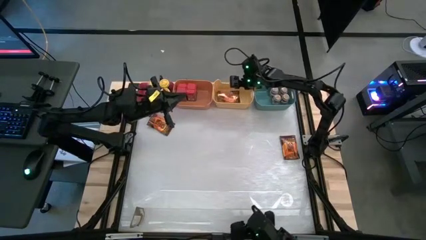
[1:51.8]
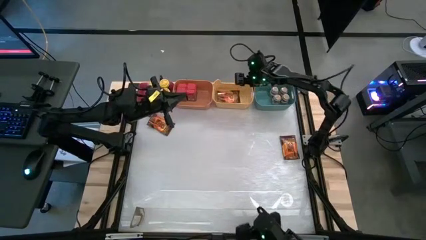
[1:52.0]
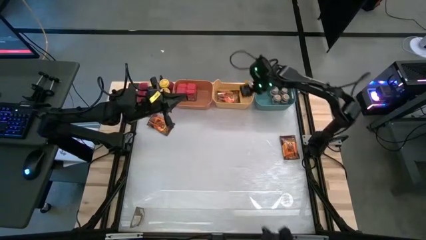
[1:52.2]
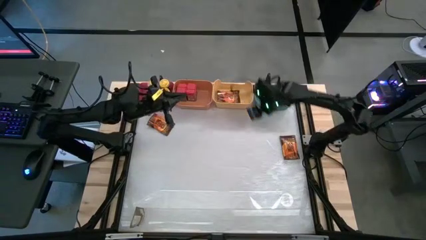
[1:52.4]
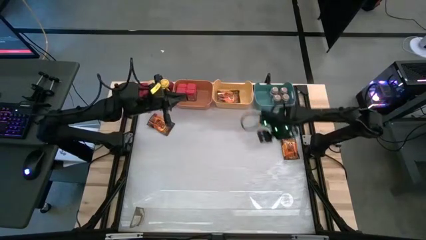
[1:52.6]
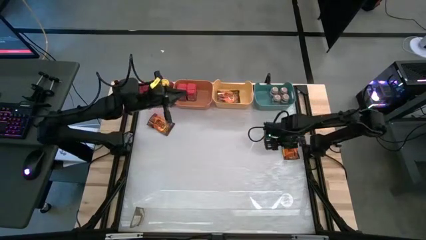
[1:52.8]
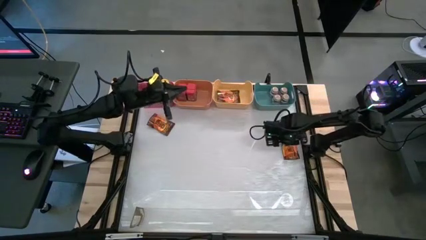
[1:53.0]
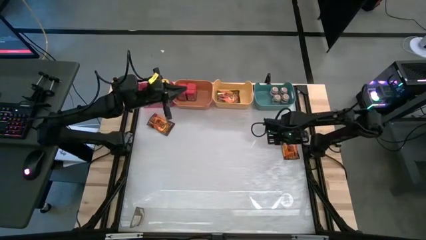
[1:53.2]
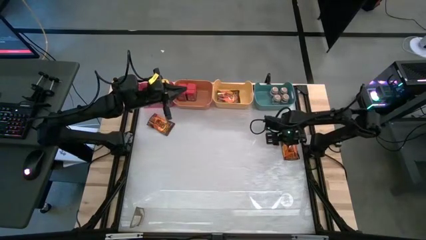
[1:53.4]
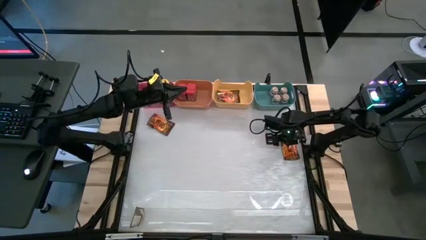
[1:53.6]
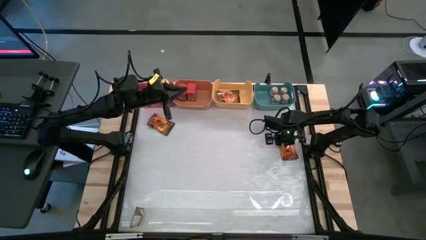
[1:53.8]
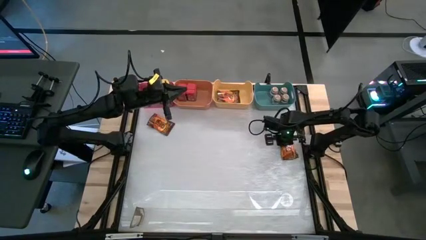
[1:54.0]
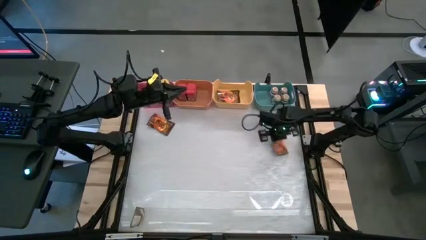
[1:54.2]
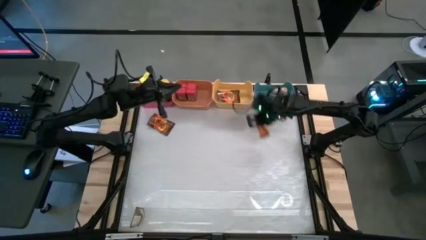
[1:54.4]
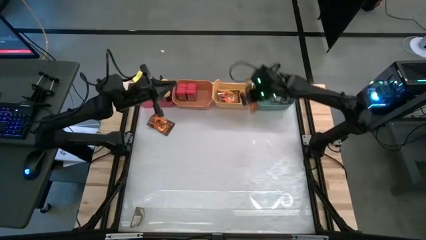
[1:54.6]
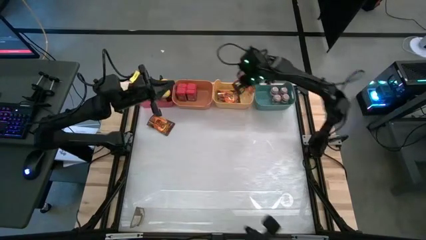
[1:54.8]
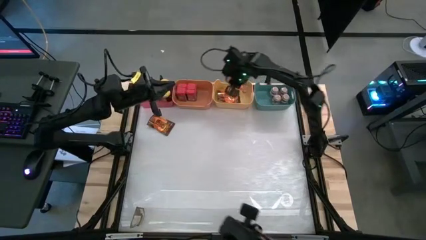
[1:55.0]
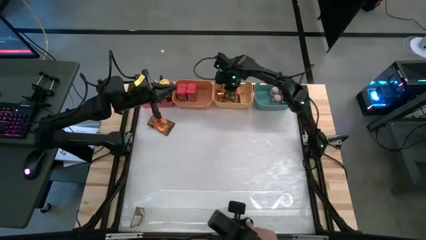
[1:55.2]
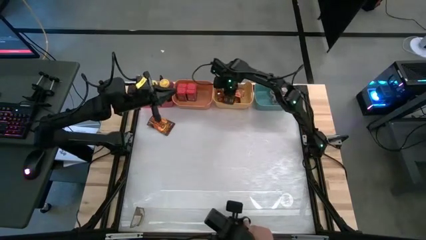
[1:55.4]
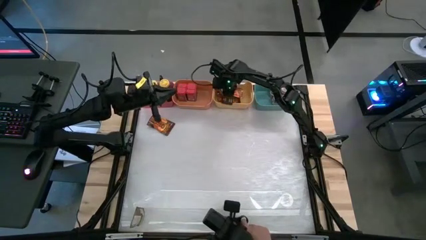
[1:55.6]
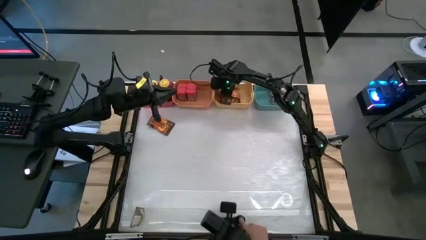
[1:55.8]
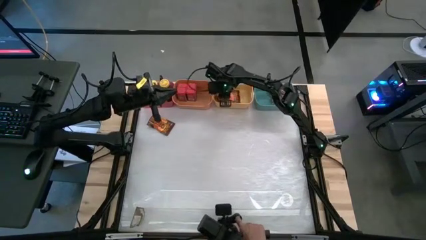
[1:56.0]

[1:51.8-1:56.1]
Task: Sort spices by type
Put the top orange seasoning pack into the yellow bin

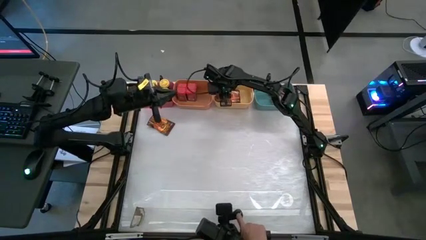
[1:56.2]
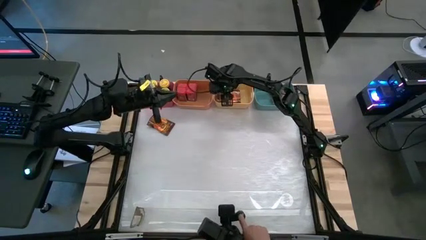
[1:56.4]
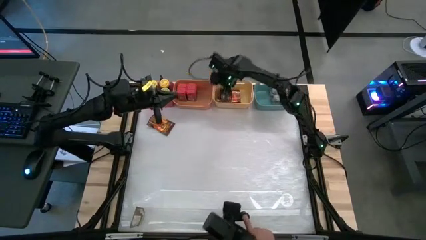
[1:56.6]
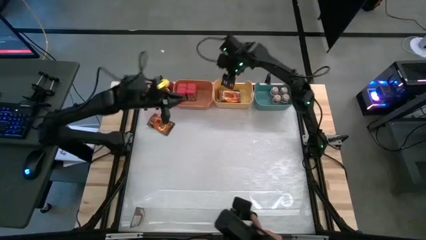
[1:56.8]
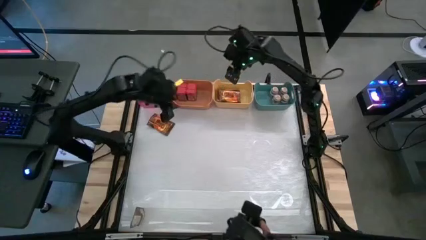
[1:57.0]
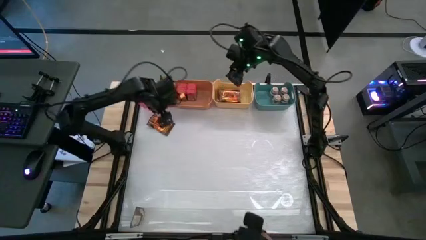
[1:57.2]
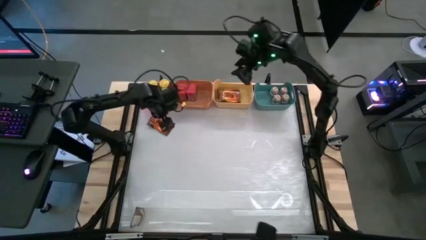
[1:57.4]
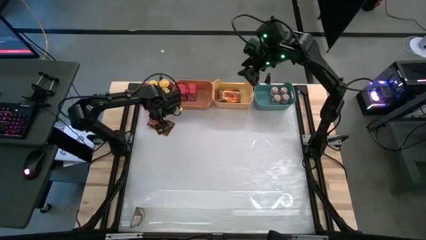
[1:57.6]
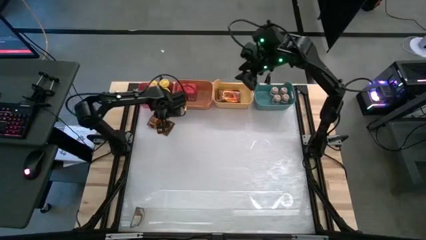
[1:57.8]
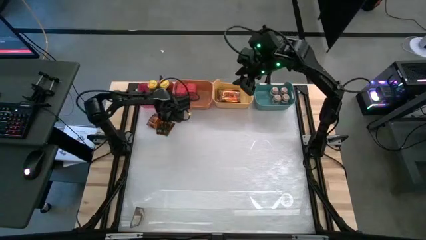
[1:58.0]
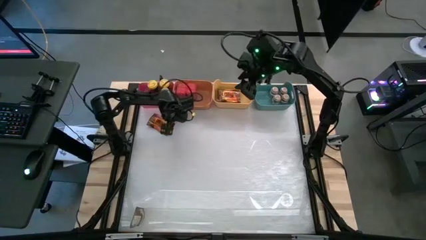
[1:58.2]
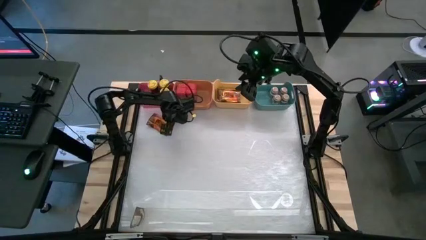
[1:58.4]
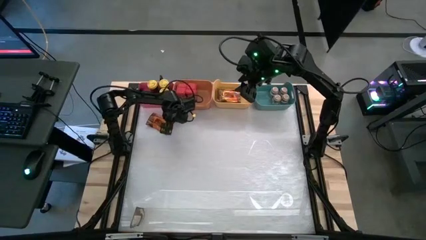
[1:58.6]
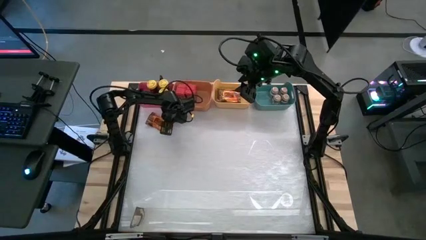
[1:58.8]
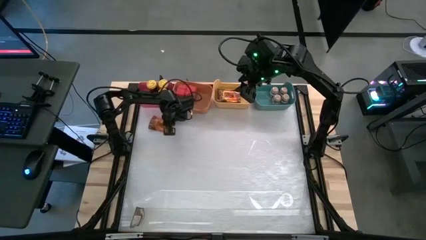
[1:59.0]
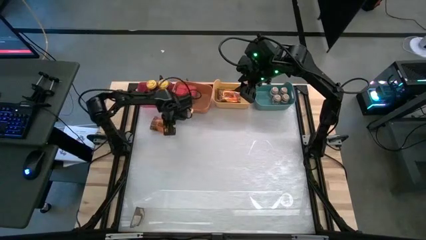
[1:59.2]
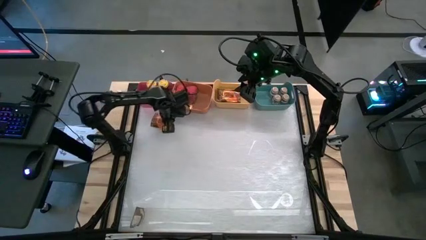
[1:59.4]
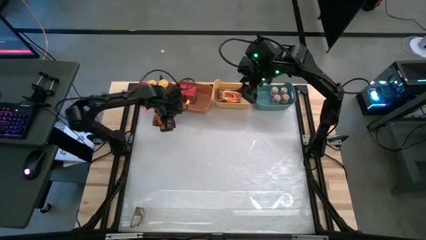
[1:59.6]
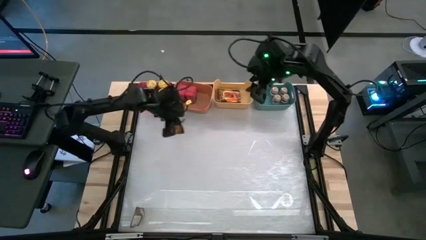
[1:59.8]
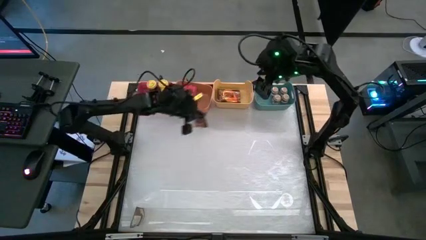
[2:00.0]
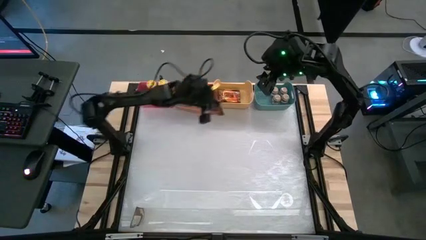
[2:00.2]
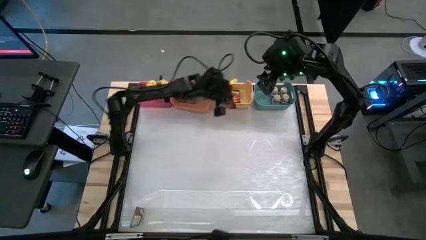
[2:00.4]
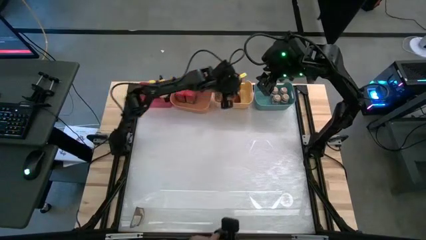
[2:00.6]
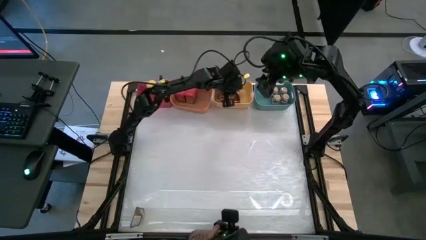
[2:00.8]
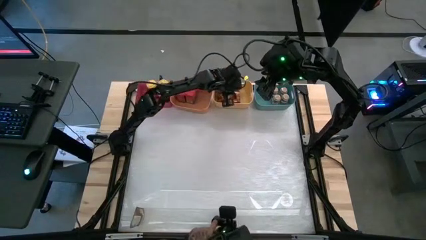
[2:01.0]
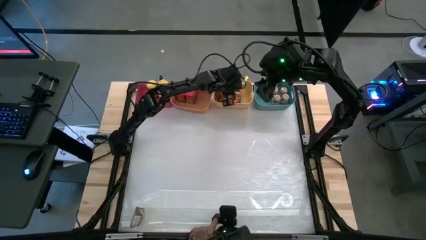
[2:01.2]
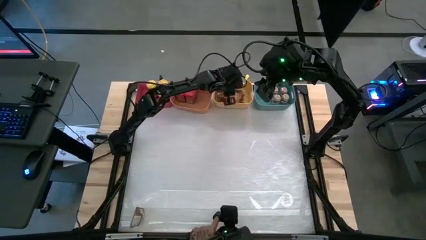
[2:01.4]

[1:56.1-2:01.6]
Put the orange seasoning pack into the yellow bin

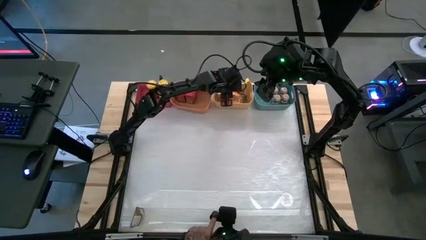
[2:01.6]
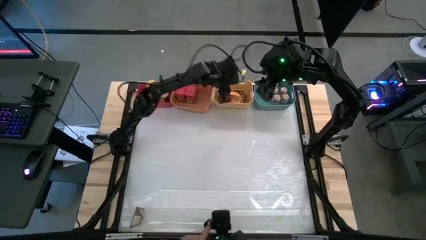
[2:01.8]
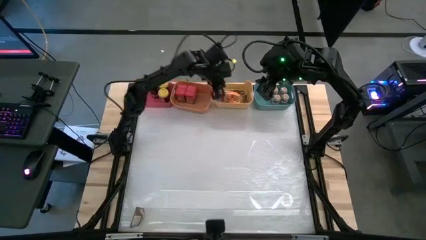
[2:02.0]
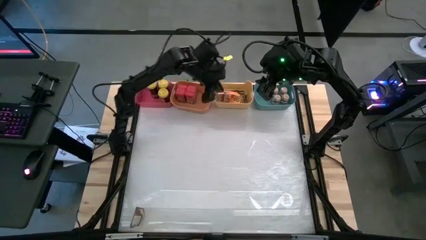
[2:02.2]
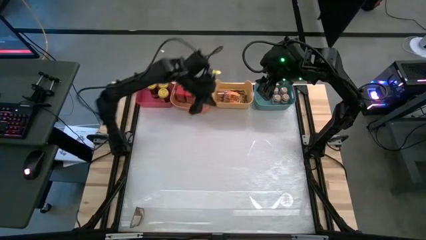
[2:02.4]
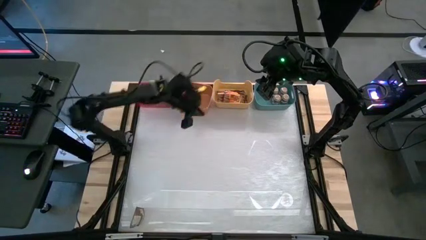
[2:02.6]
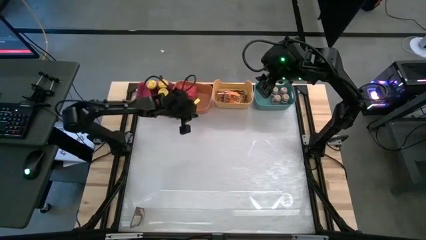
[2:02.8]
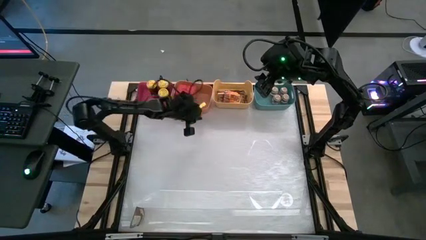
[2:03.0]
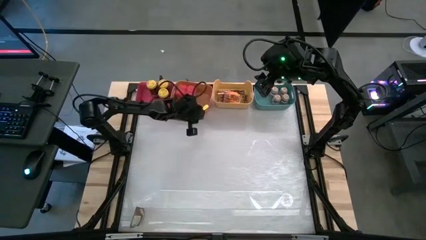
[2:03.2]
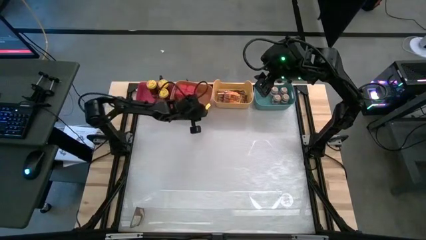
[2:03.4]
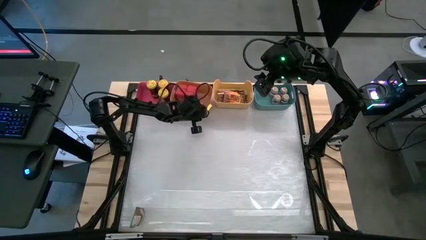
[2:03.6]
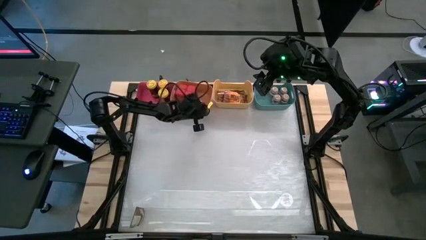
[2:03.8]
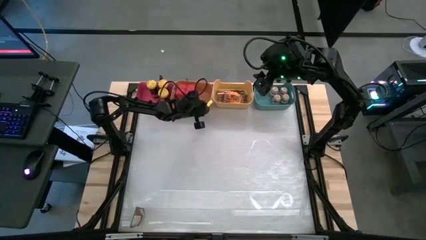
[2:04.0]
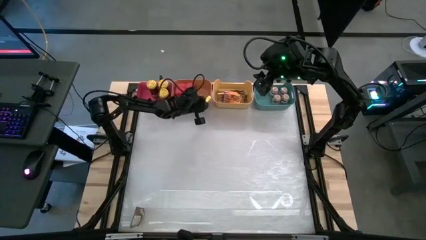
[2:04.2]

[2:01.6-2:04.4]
Adjust the orange bin

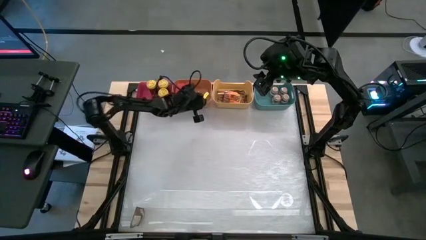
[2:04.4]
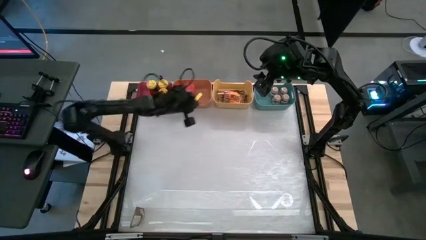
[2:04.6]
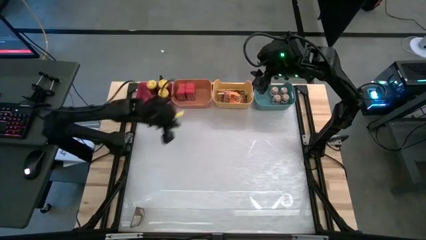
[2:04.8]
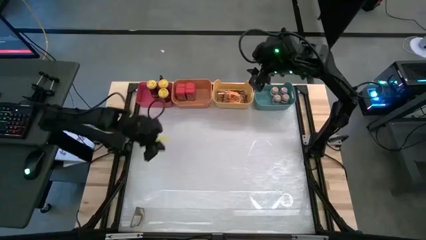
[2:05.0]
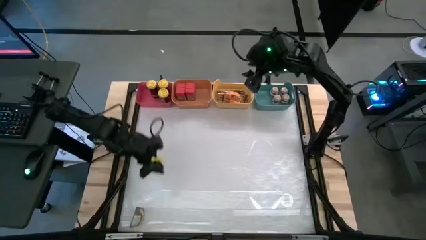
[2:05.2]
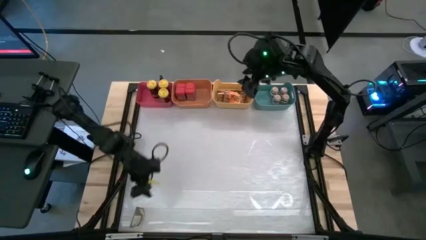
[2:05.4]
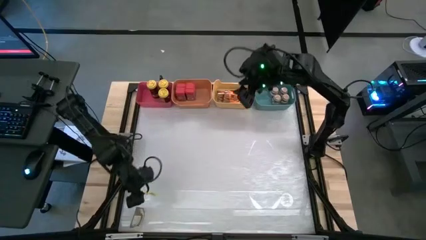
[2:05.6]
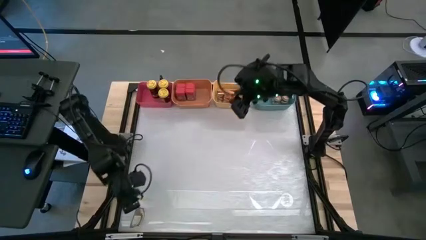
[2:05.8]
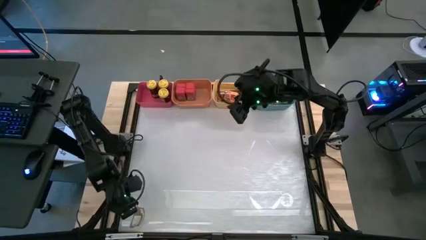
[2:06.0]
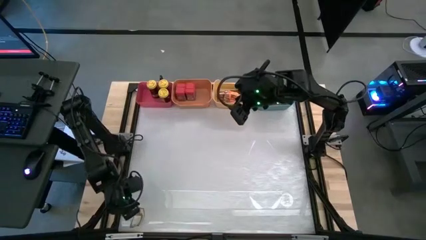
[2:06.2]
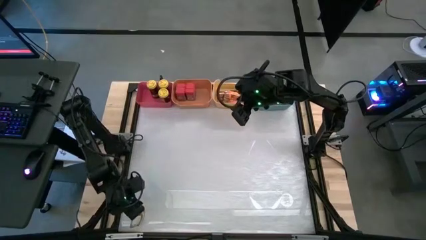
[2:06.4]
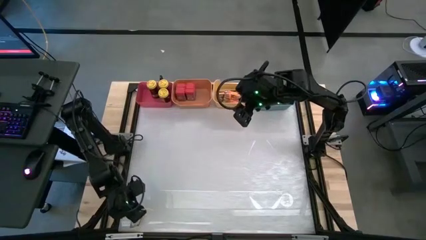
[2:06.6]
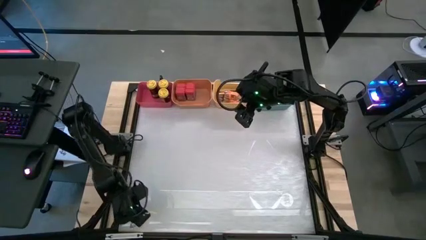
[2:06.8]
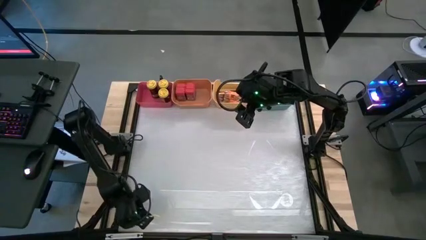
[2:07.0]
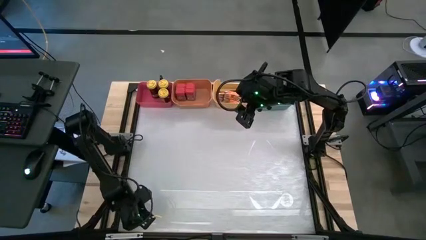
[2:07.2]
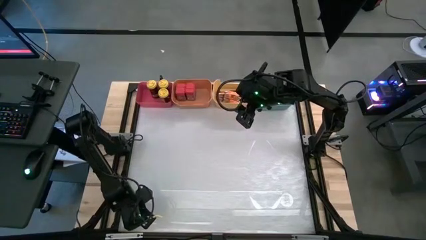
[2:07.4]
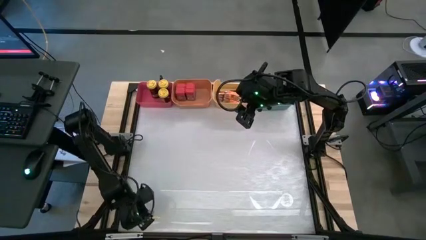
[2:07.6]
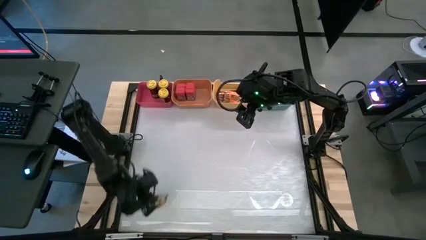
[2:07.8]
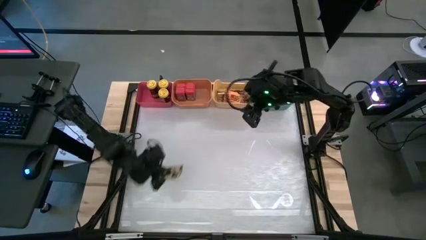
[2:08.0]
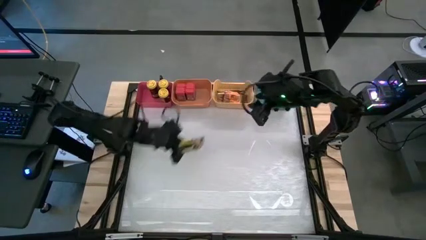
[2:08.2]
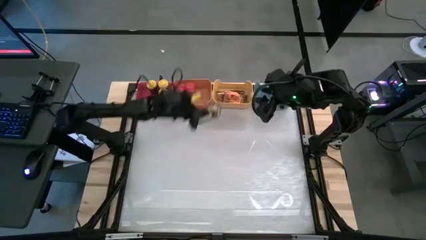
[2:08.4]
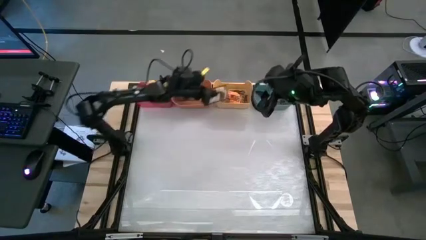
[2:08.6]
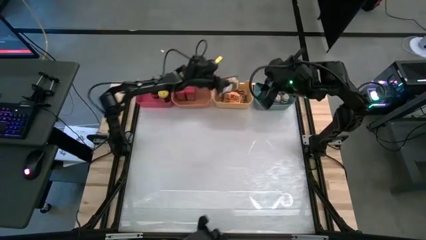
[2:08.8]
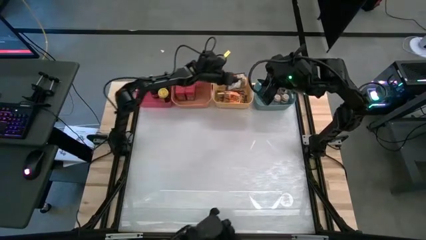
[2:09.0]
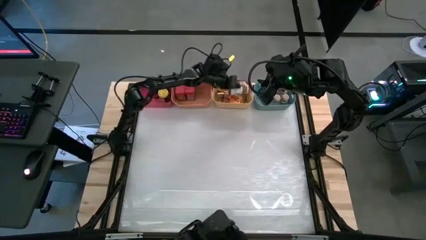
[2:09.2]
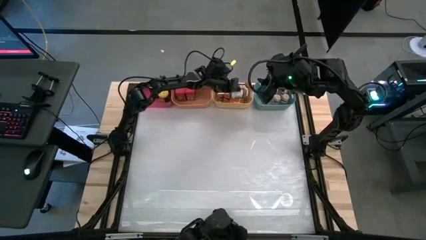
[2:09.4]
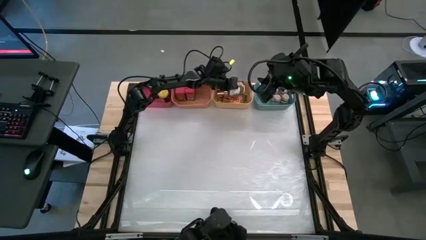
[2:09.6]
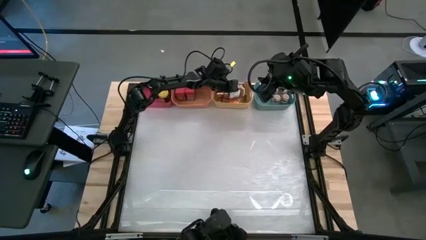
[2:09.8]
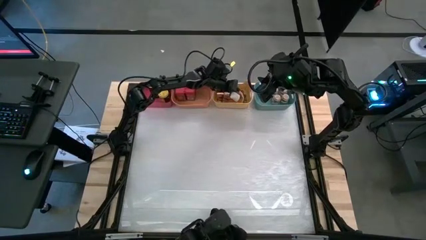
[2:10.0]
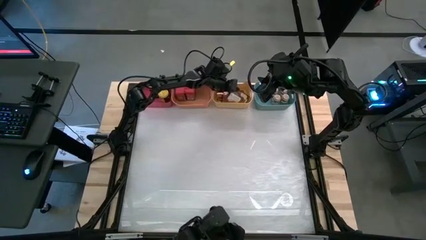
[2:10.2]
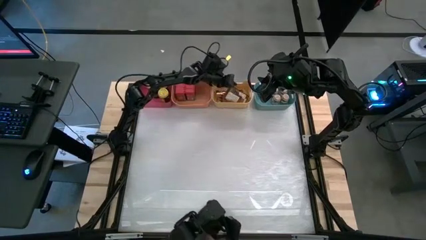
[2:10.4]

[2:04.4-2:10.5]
Put the orange seasoning pack into the yellow bin
